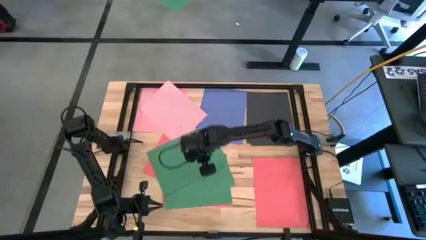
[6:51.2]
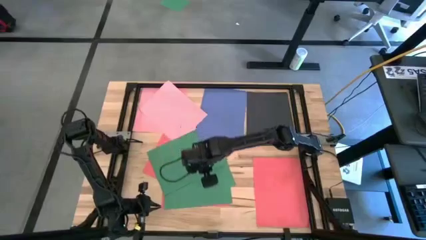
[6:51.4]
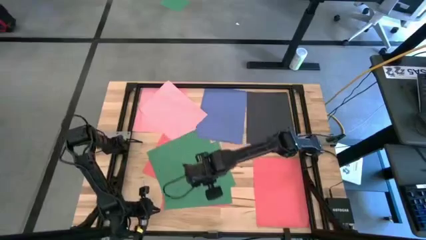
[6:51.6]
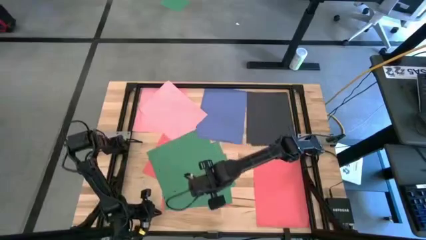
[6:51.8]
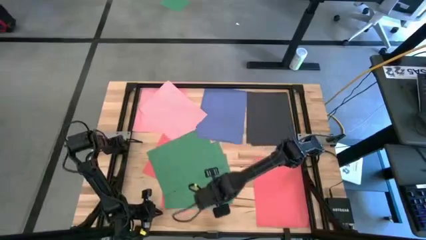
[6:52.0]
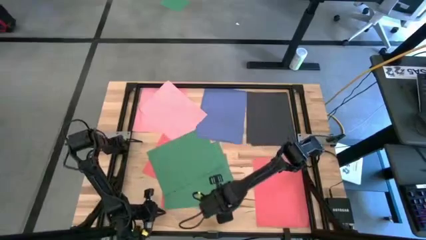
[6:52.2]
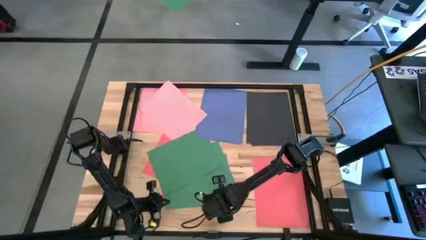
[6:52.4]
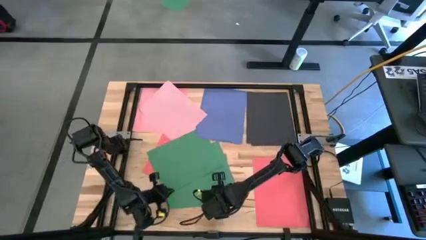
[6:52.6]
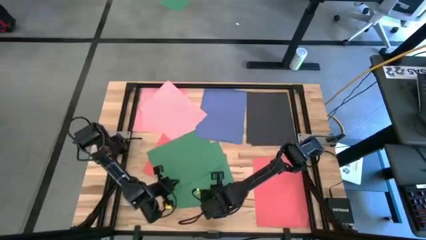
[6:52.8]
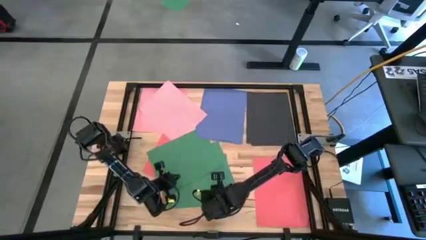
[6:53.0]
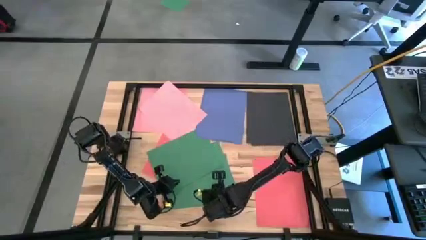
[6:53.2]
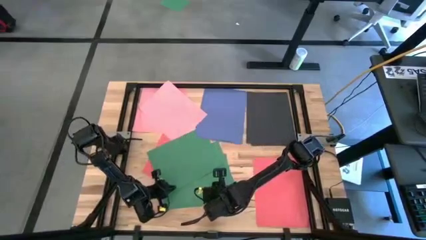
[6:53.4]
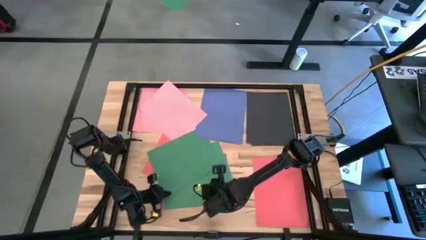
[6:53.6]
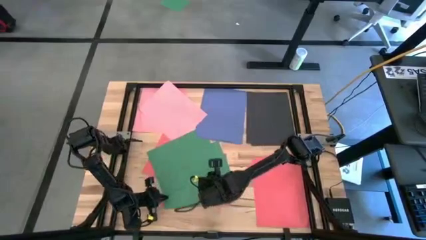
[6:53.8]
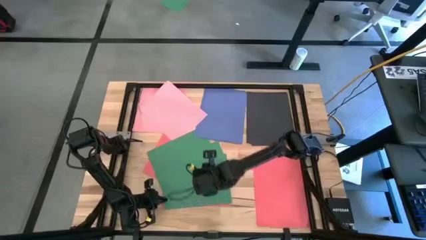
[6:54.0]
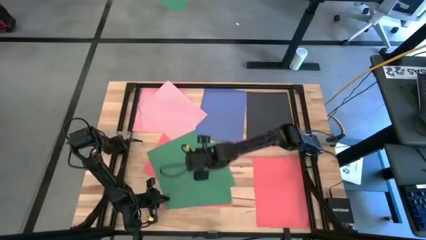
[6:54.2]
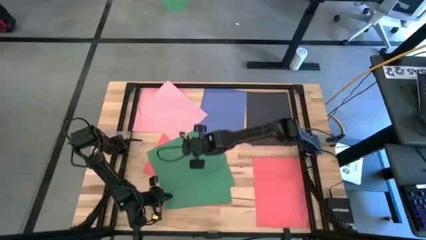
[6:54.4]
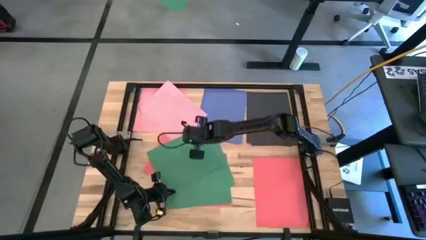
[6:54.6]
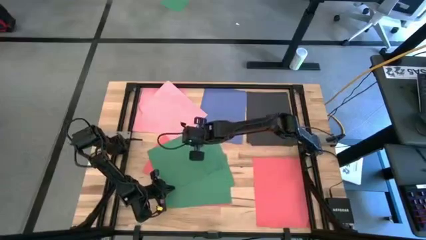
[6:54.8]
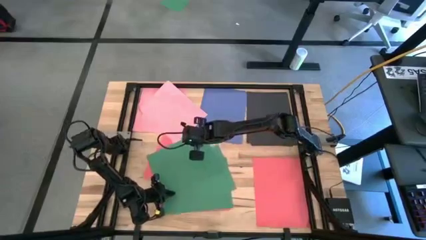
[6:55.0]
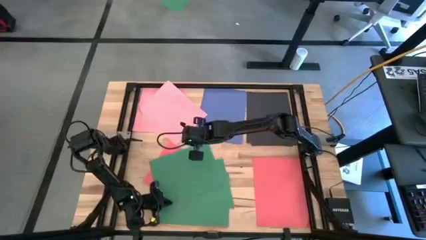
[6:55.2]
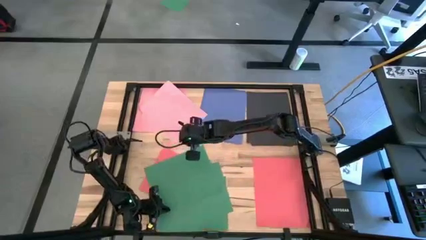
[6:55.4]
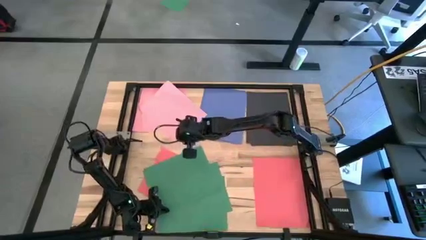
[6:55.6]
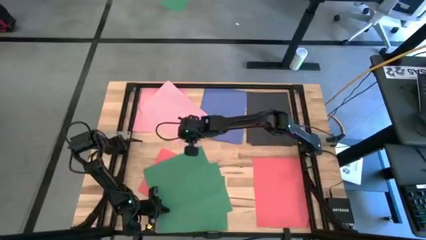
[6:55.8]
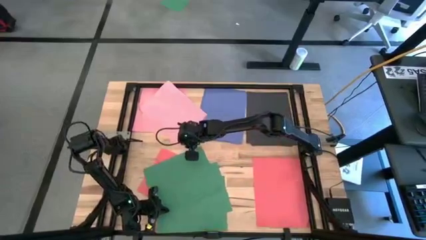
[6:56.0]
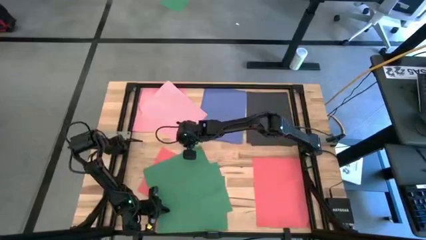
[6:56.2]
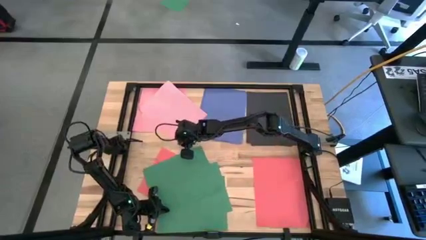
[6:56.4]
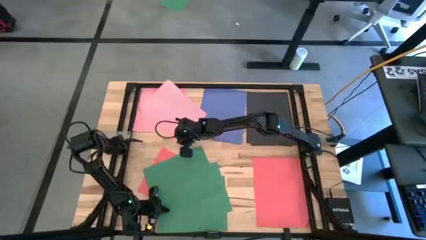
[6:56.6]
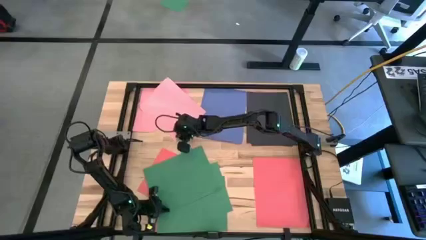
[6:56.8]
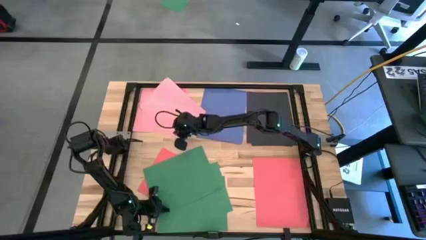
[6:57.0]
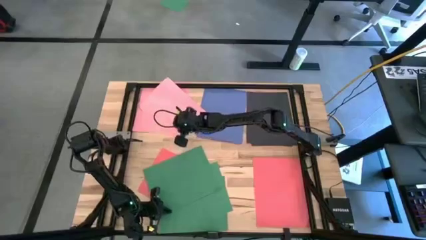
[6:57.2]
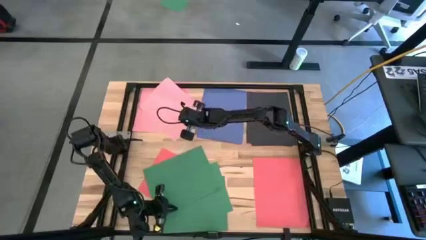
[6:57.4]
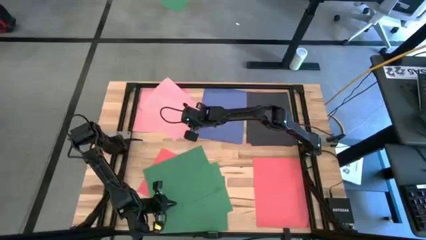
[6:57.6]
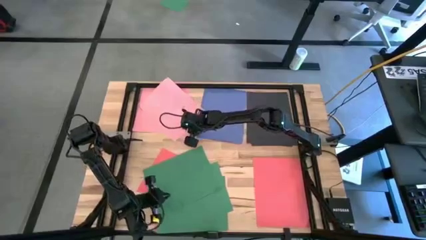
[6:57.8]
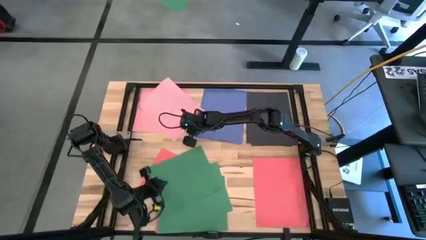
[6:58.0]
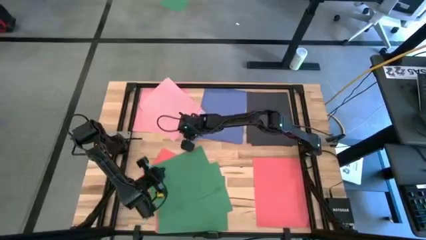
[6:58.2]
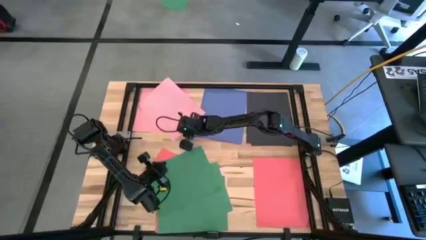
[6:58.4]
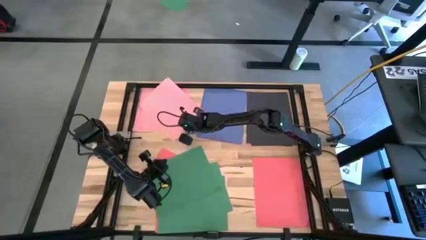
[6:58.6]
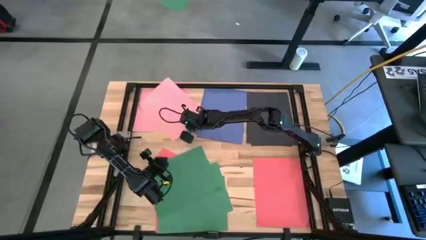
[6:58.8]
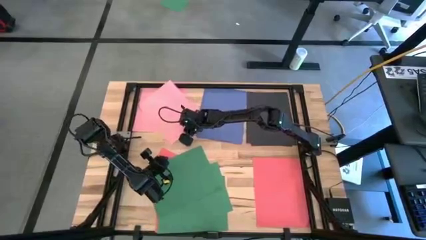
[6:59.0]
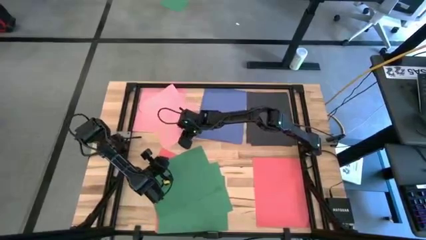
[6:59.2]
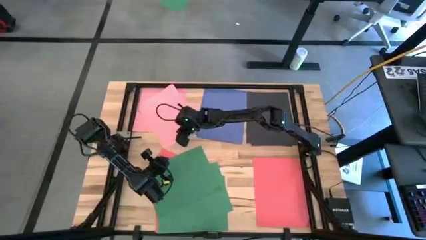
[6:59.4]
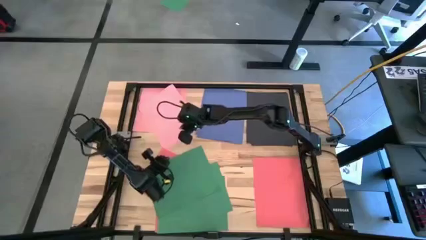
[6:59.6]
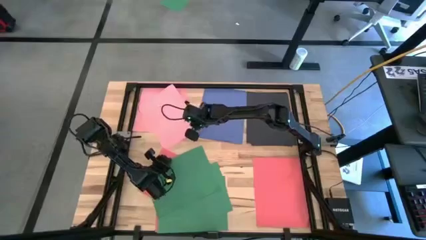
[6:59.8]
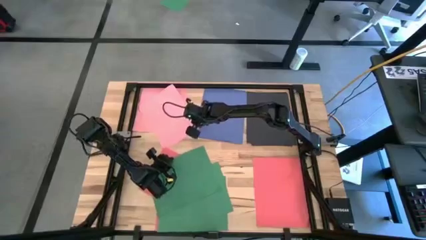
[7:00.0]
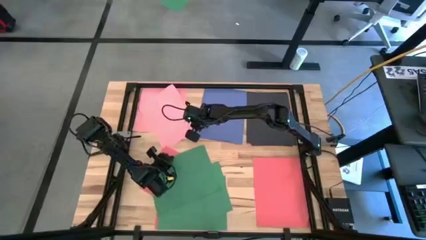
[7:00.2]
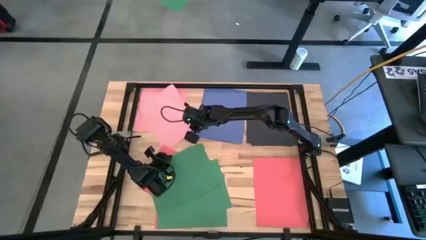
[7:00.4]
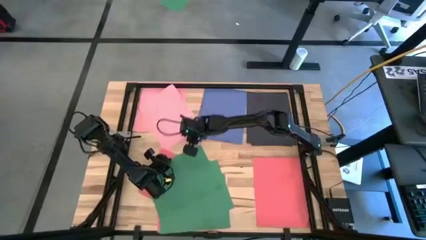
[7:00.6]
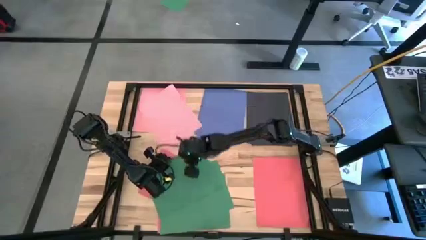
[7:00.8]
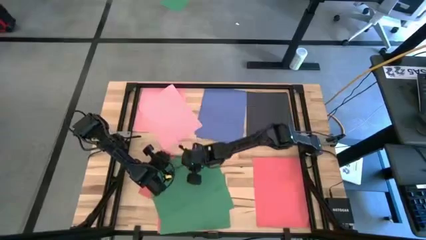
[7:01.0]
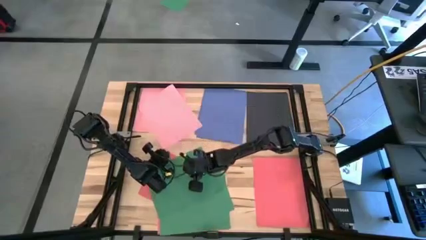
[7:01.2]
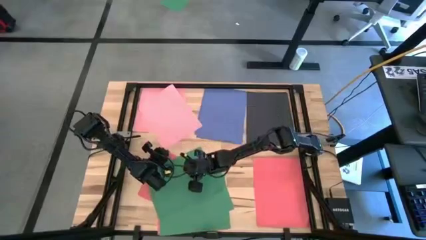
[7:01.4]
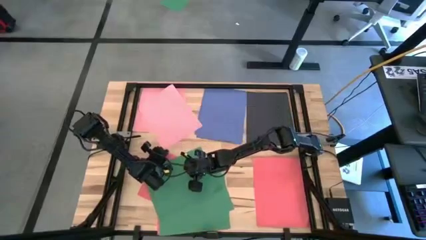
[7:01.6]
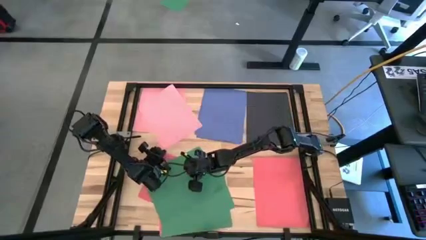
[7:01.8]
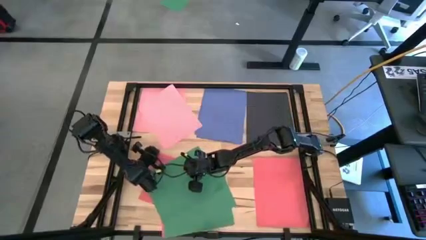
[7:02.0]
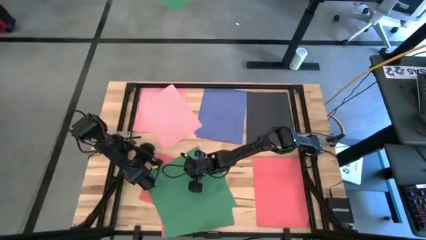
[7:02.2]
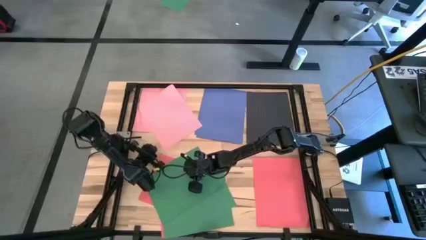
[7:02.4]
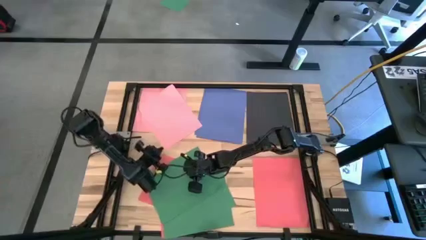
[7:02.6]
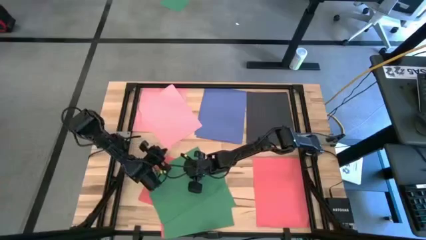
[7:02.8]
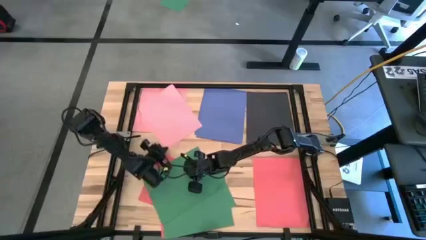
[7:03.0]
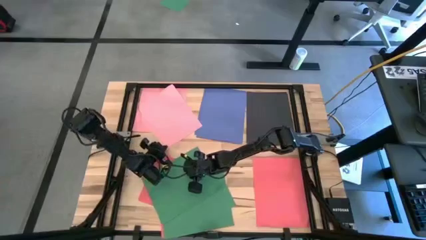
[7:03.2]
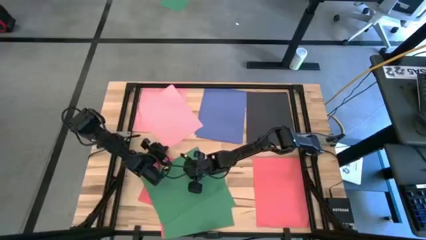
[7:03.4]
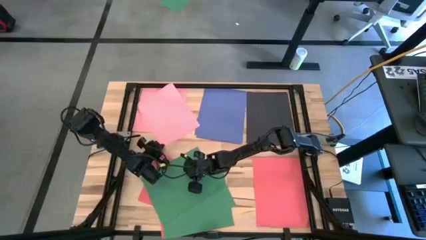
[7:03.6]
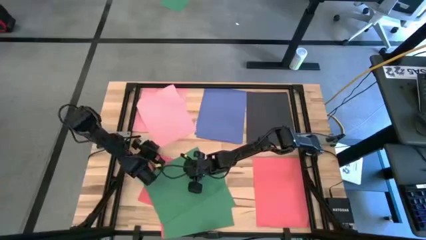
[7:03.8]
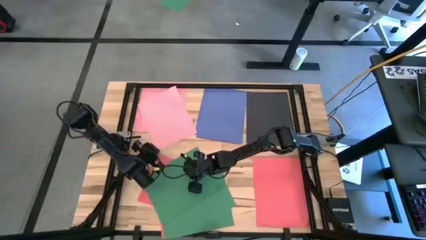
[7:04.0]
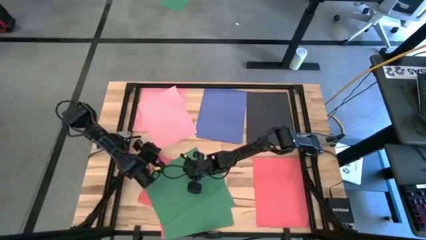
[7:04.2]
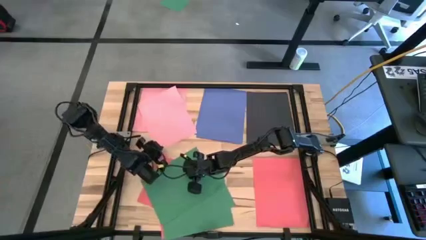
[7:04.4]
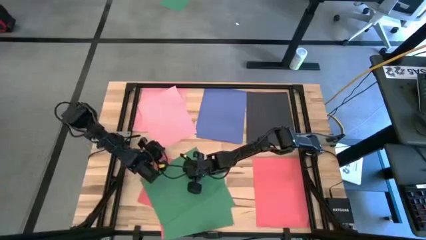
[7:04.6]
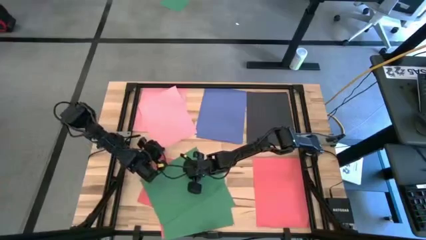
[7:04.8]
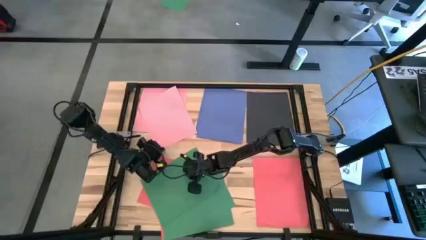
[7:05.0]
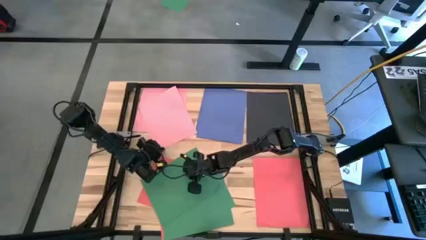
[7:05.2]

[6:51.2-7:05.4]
Task: Organize paper
Stack the pink paper on top of the other pink papers on the table
